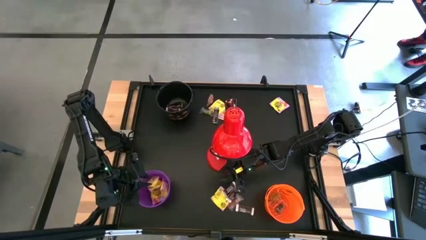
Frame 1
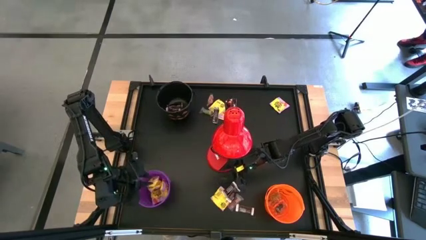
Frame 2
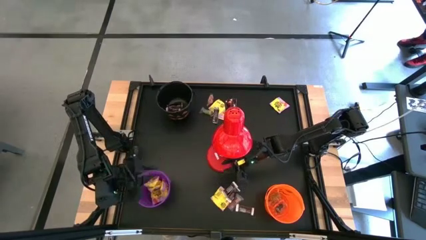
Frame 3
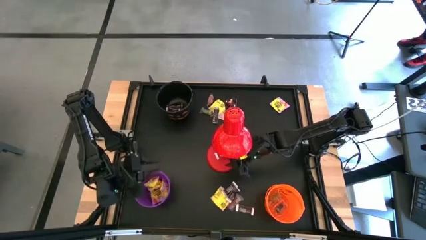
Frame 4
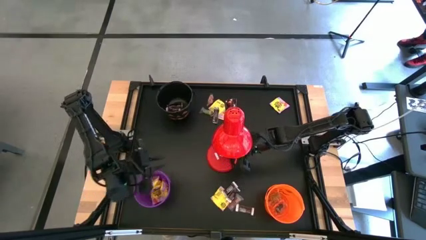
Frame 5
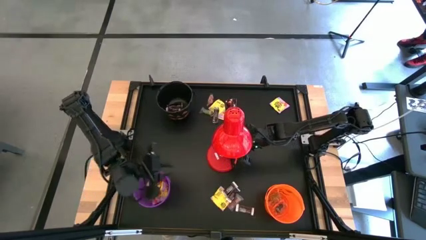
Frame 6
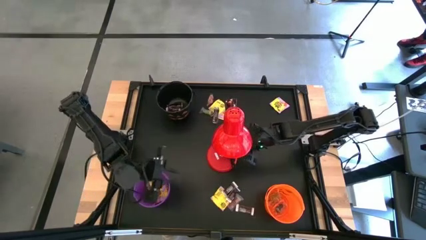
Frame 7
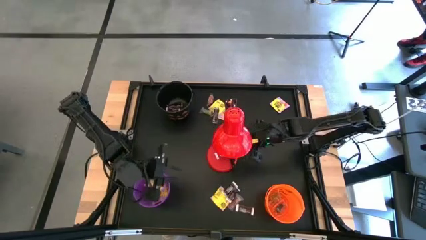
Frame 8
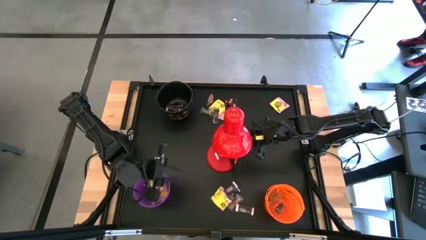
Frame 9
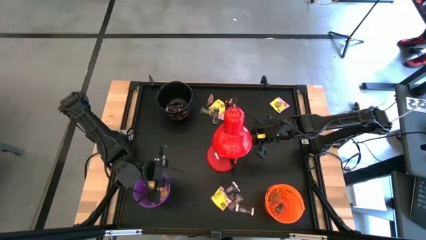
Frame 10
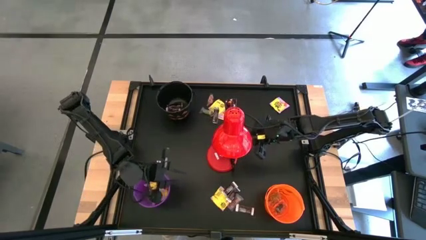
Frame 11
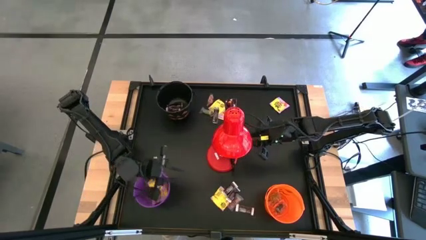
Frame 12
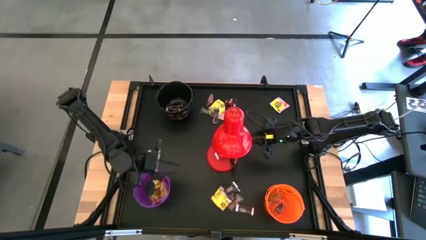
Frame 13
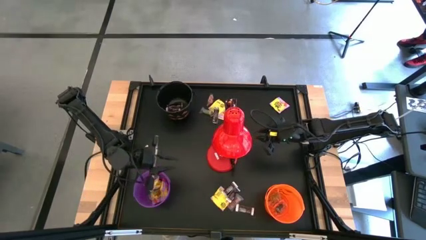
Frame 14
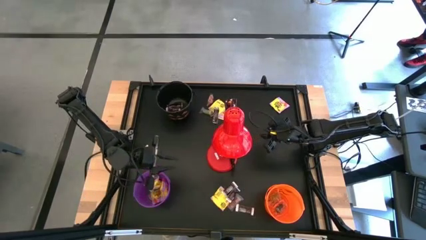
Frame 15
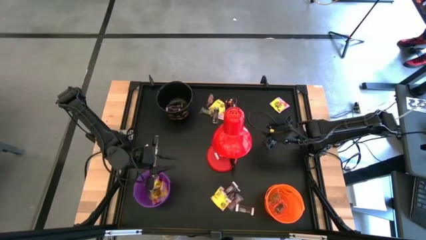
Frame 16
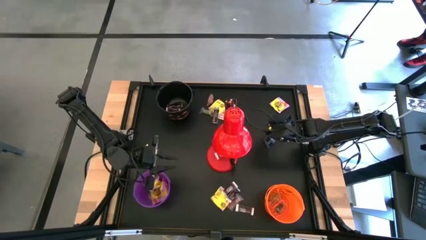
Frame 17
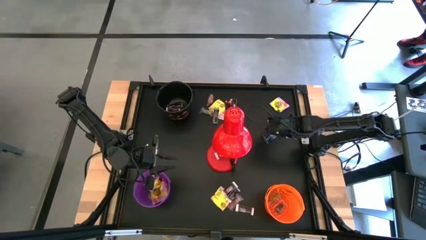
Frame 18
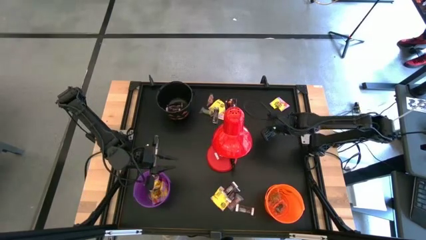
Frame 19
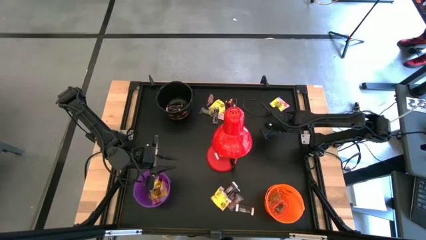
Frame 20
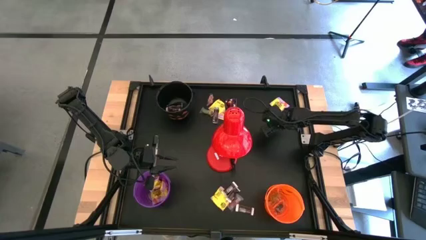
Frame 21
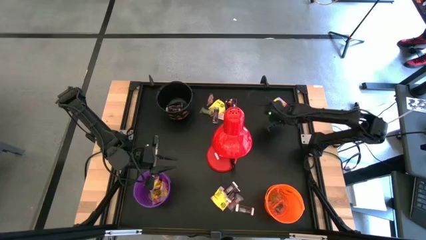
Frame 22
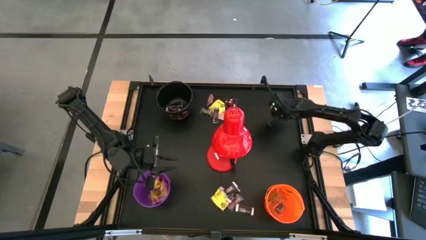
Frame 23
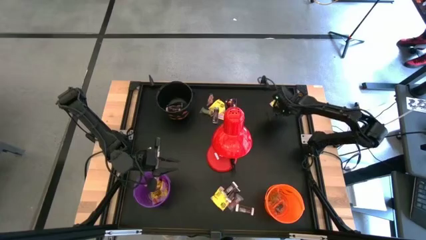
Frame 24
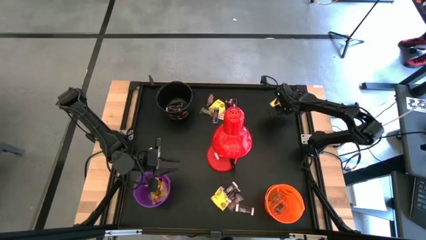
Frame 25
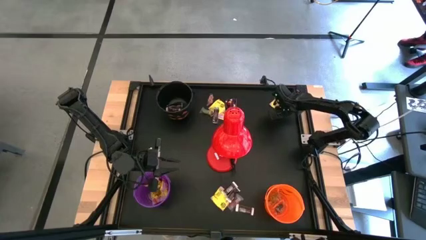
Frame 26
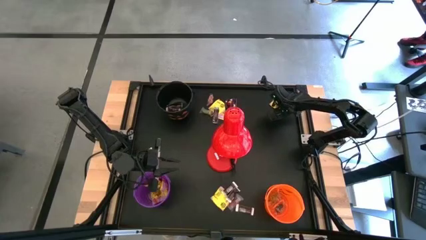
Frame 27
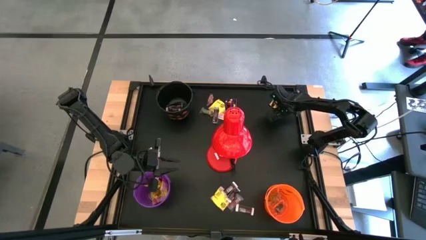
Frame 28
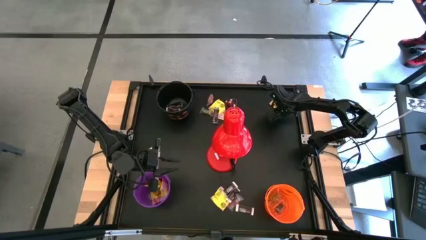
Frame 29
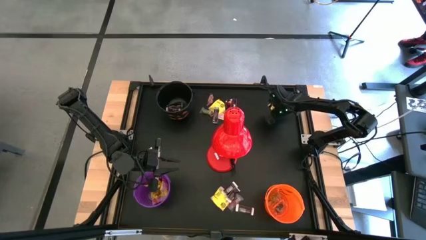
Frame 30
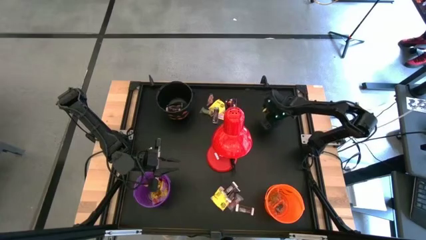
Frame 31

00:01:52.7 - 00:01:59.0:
Task: Organize candy in baskets
Put the yellow candy into the violet bucket

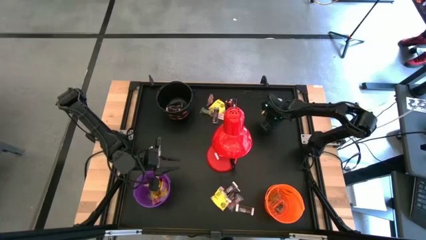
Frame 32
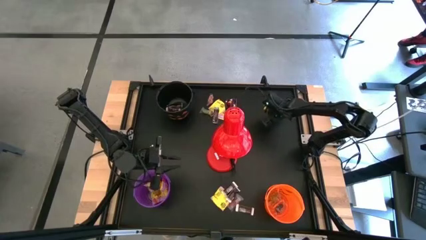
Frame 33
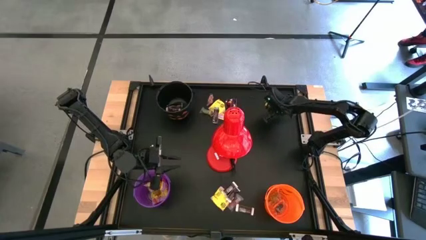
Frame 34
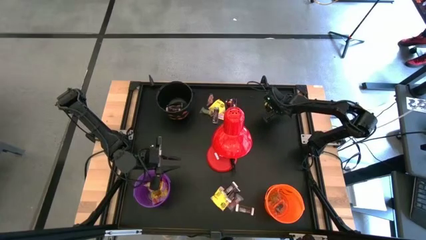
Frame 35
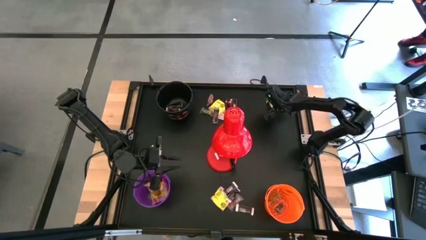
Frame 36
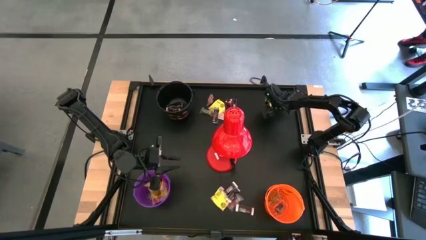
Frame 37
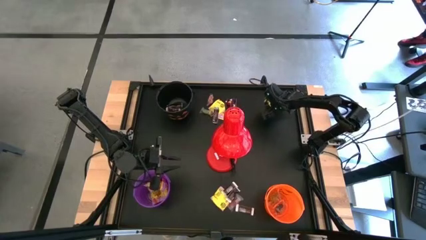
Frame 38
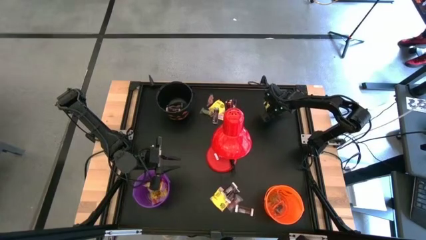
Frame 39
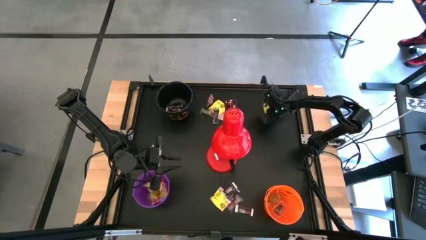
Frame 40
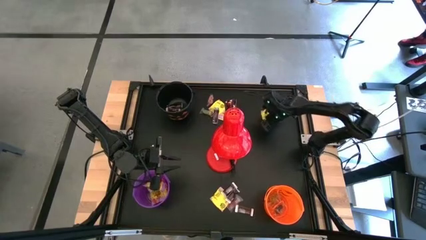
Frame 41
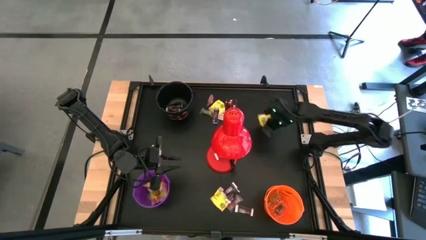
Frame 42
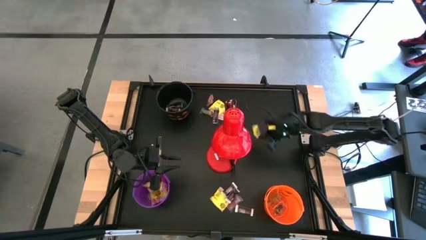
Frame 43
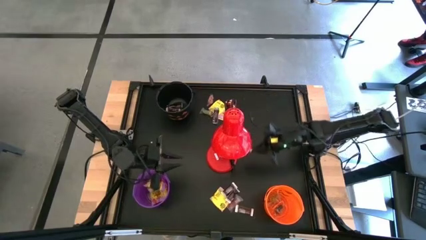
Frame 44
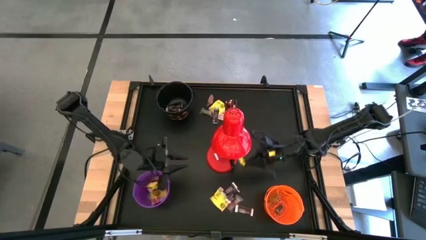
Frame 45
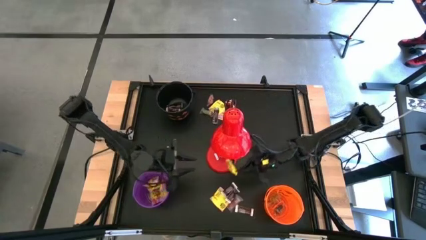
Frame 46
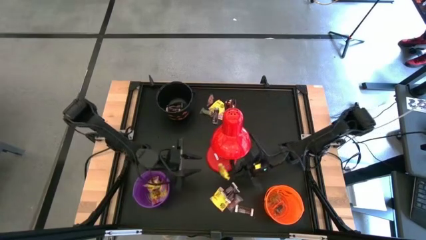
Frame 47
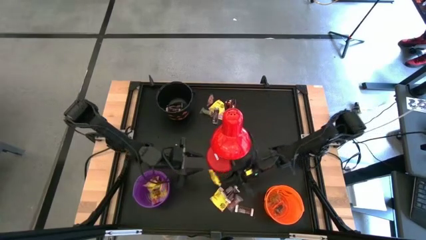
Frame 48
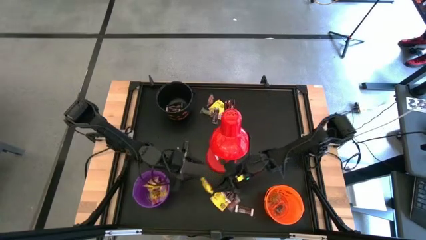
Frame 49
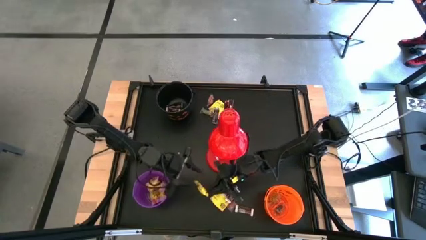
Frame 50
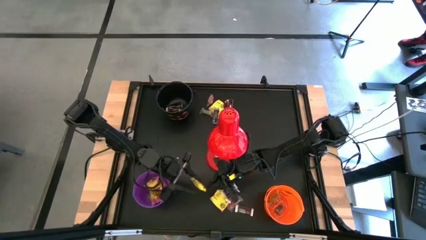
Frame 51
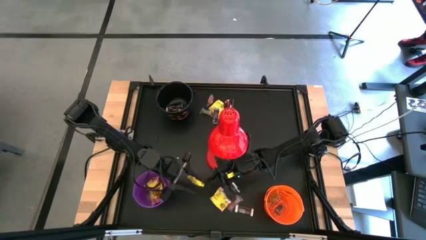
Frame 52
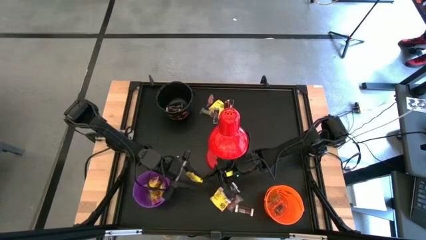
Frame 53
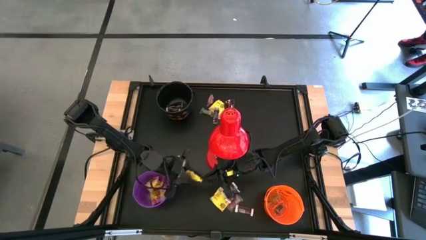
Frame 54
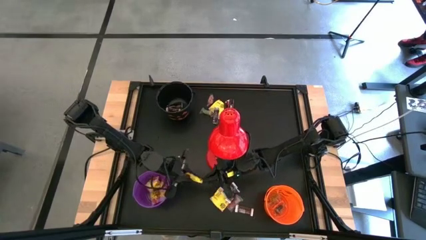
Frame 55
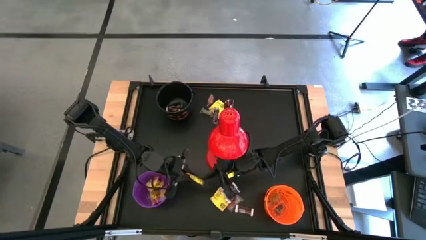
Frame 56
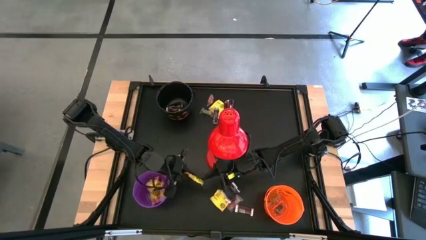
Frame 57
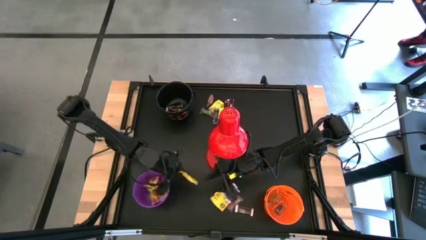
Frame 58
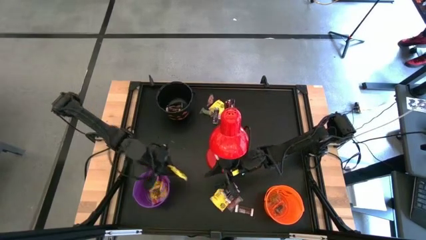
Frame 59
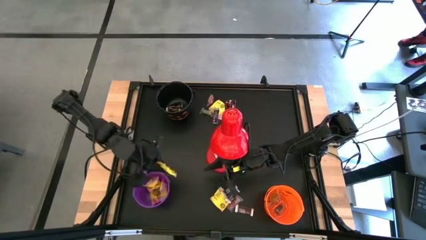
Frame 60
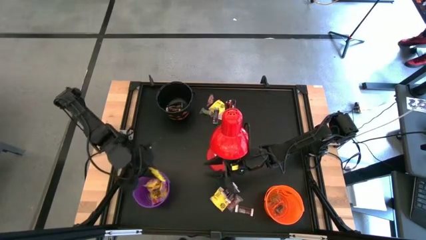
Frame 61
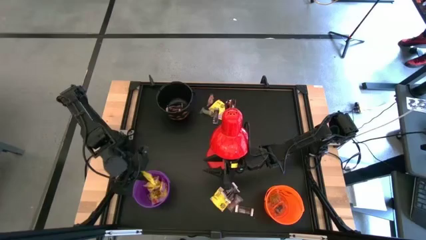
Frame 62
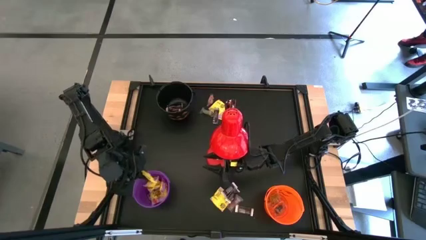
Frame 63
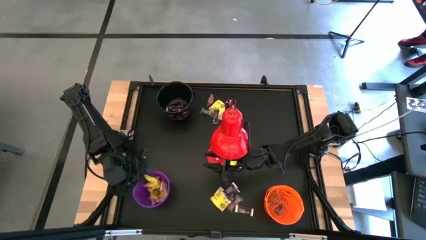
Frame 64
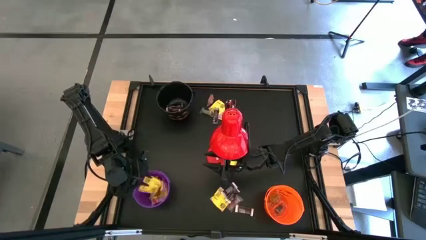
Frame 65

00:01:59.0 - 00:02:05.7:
Put the yellow candy into the violet bucket

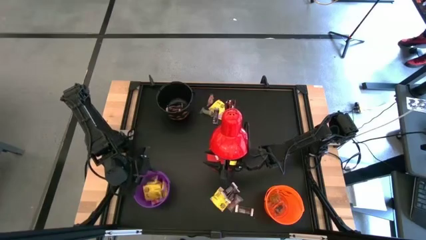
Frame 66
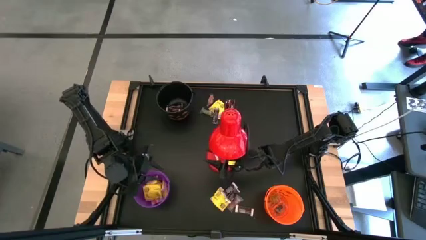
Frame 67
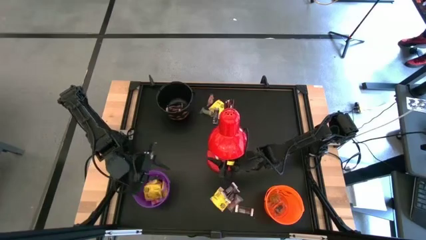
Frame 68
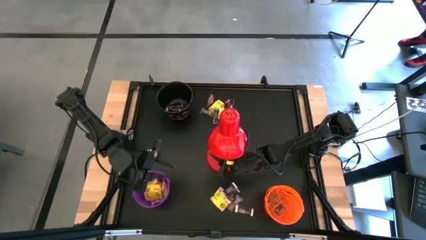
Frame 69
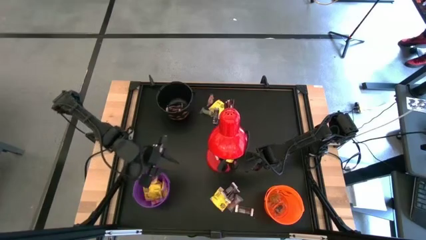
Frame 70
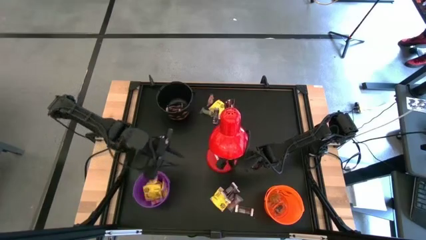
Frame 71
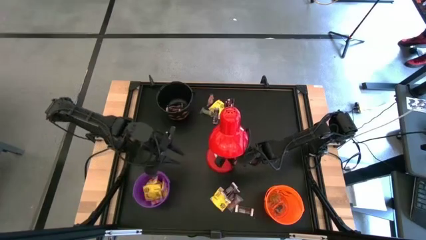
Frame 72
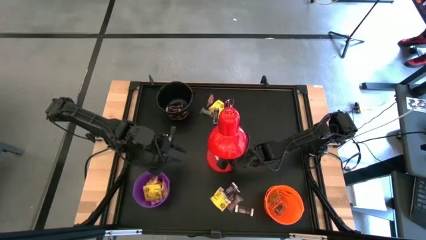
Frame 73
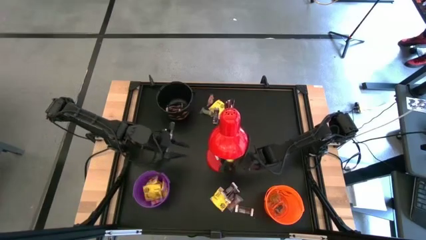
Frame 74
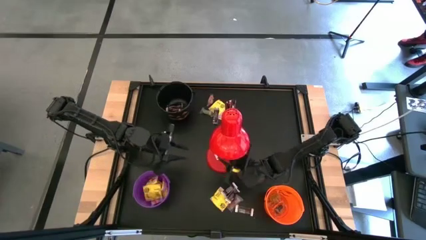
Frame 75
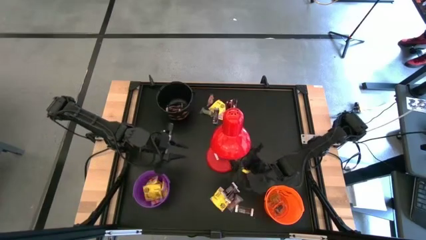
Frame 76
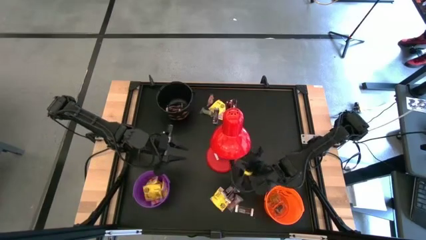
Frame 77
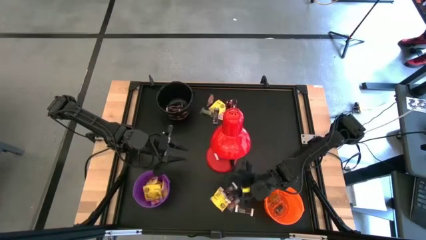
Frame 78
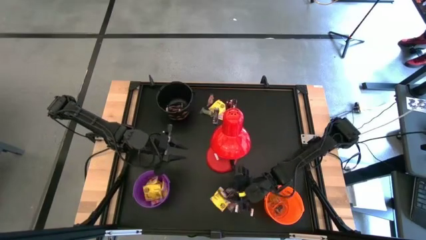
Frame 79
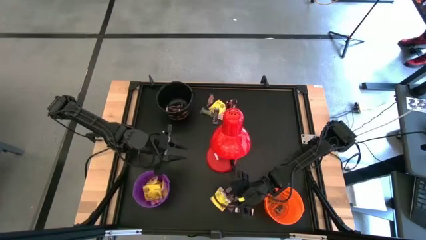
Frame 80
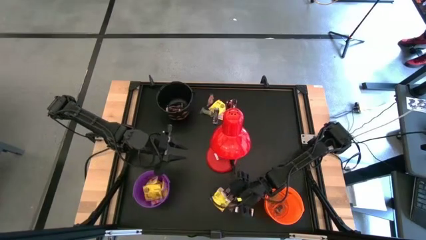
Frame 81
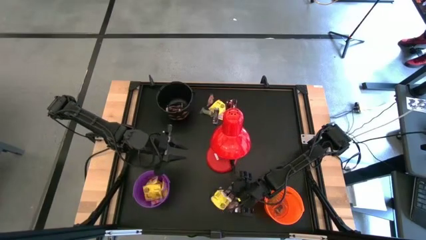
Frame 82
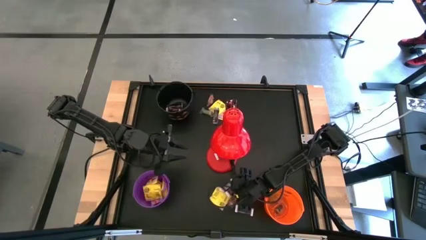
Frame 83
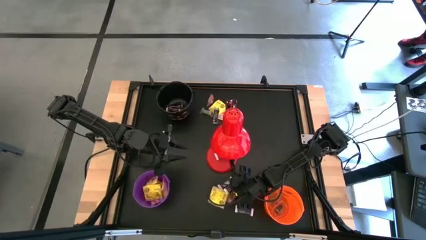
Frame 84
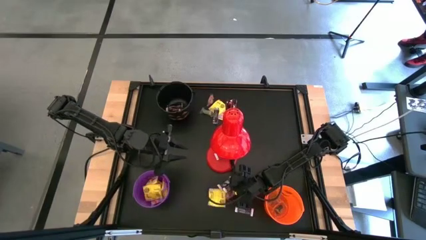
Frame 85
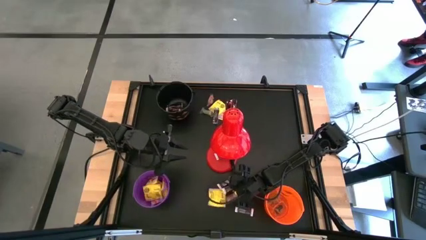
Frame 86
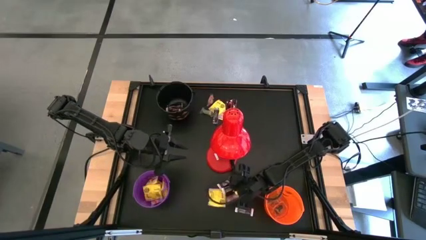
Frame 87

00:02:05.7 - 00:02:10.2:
Put the brown chocolate bar into the black bucket
